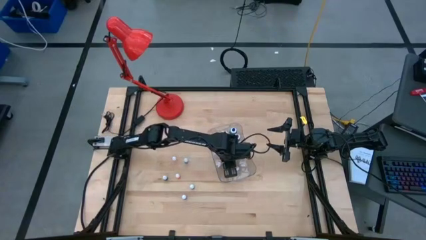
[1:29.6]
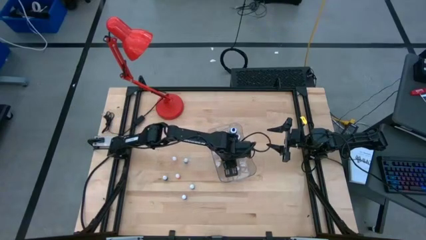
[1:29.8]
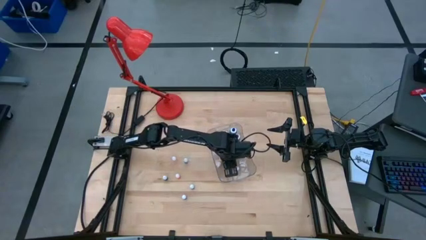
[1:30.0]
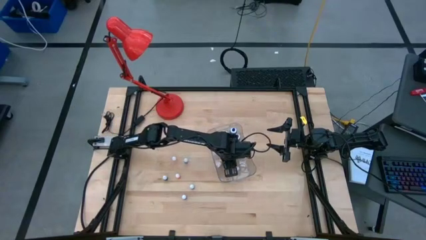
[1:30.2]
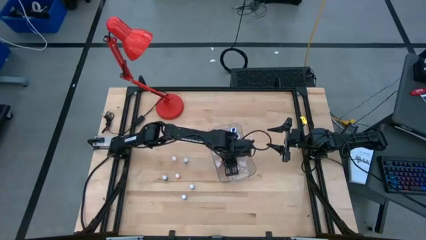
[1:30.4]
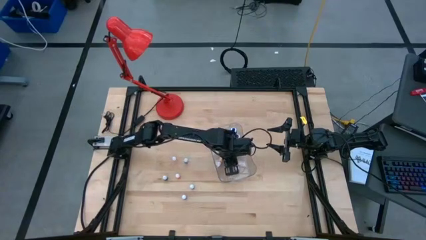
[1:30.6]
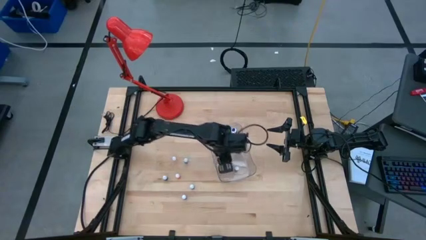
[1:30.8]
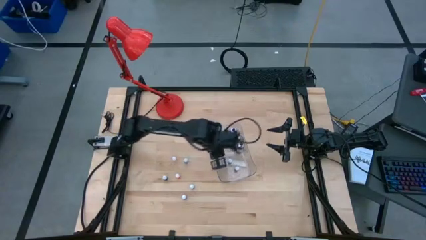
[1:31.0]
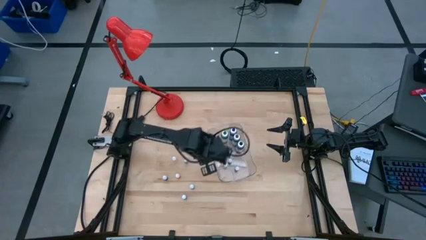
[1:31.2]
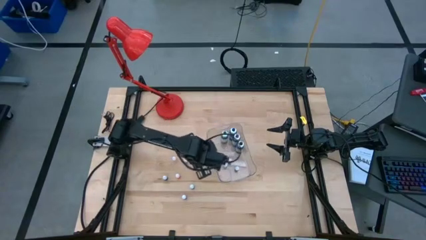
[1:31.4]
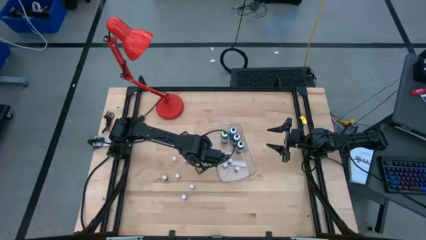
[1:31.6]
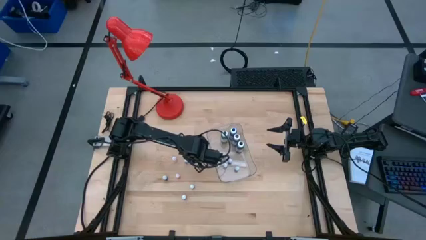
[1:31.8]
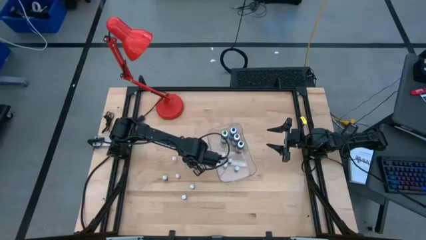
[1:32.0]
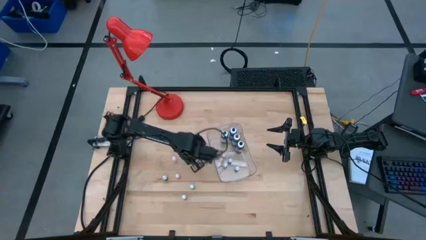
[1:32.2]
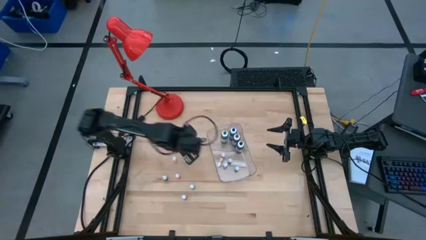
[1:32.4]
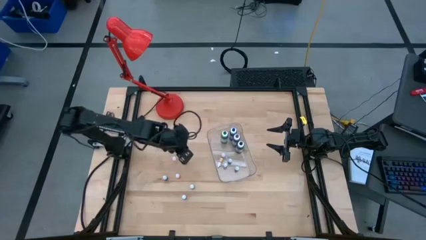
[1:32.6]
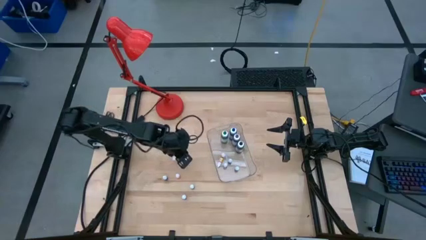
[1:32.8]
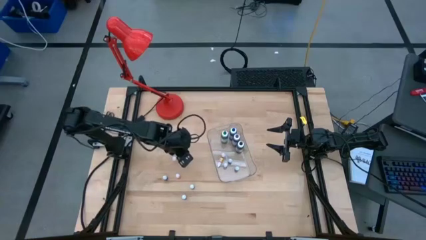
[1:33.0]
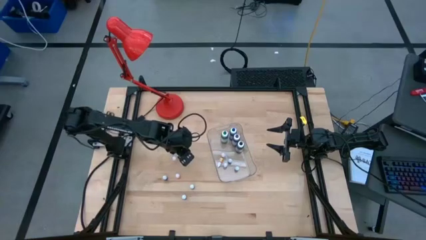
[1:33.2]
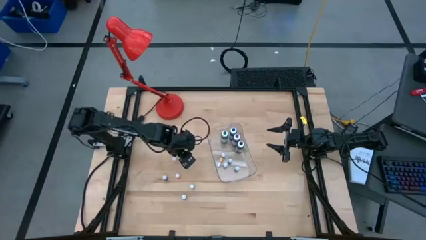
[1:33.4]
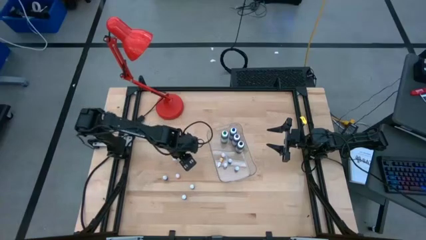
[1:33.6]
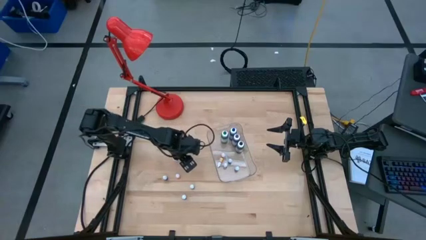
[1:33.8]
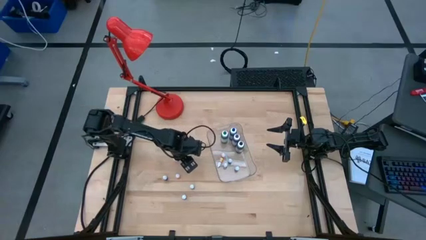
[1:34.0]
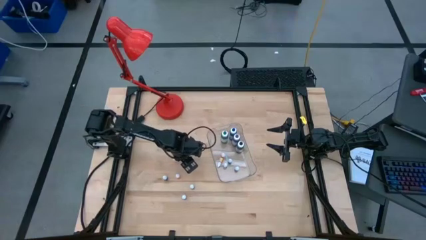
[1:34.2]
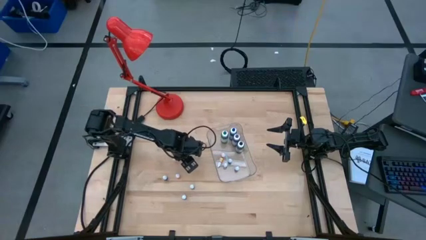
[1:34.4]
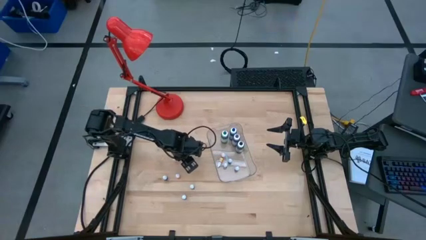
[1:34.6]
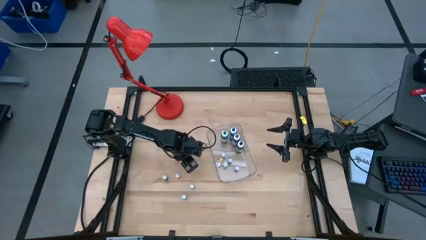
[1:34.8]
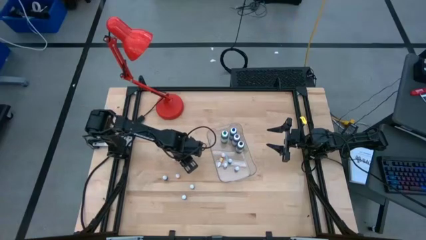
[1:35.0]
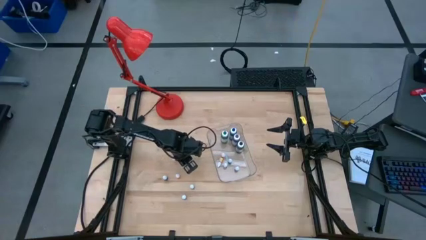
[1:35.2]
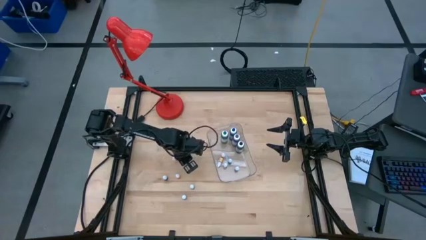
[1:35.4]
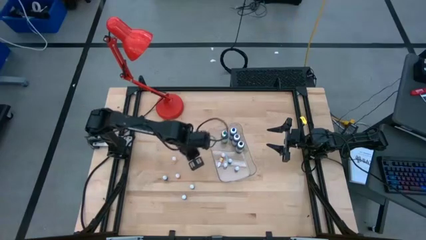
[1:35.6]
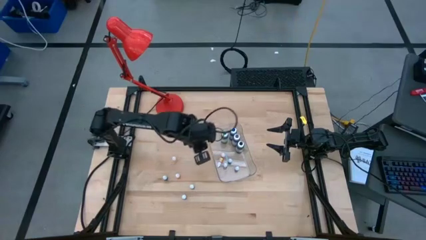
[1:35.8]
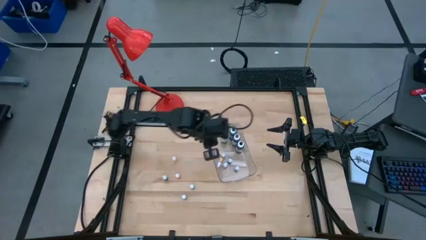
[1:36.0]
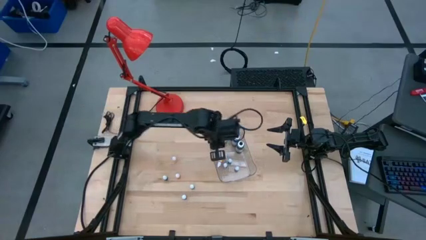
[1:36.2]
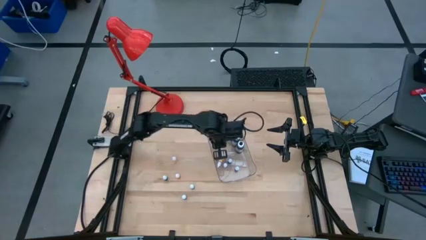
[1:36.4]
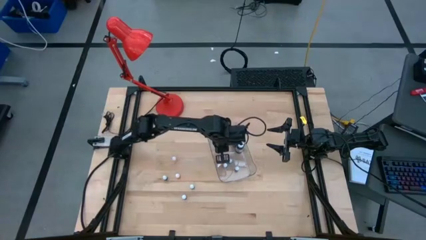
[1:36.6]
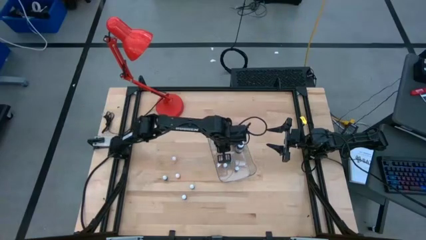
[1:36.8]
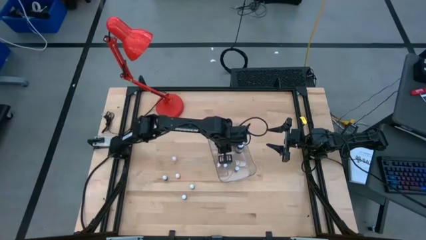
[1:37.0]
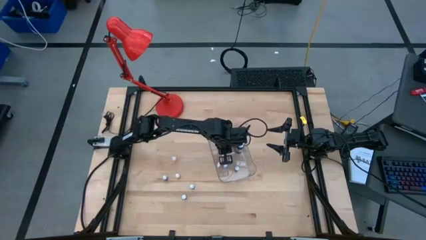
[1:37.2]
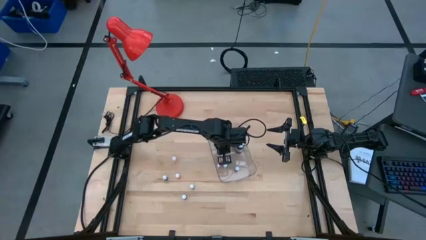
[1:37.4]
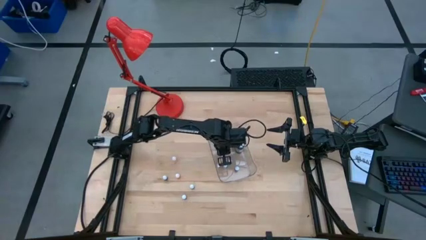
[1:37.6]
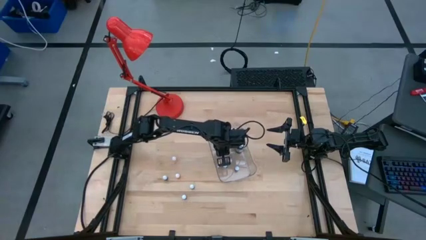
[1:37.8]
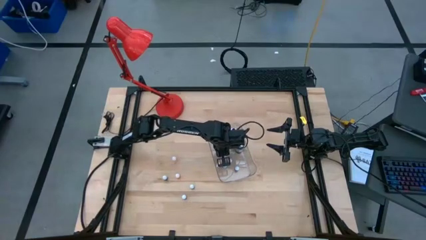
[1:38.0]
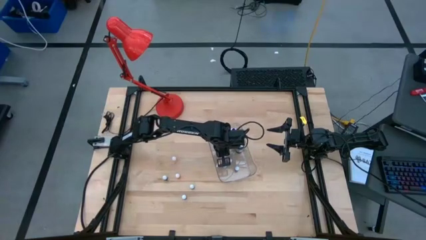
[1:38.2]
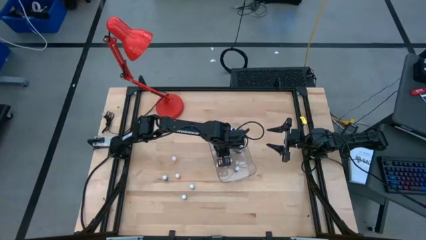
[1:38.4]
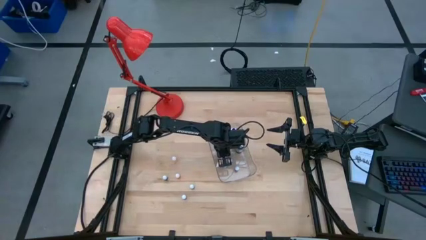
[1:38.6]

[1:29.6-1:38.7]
Task: Pick & Place food coloring
Put the black food coloring bottle into the transparent container

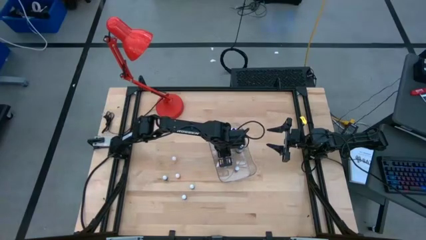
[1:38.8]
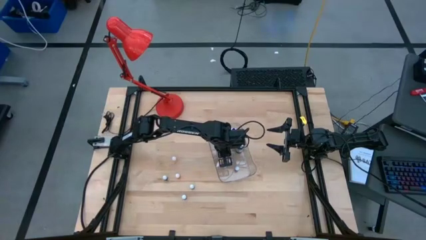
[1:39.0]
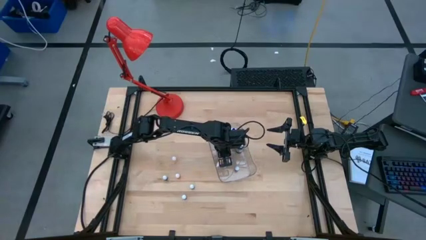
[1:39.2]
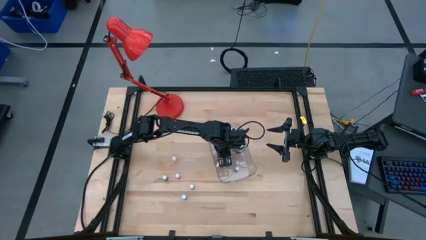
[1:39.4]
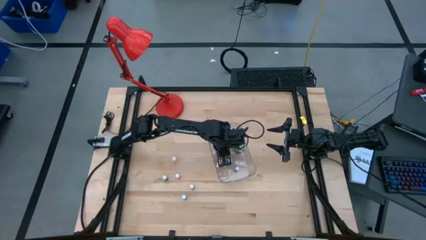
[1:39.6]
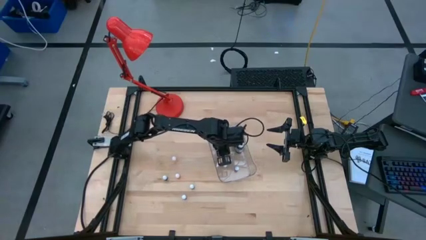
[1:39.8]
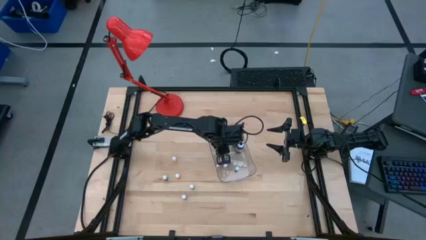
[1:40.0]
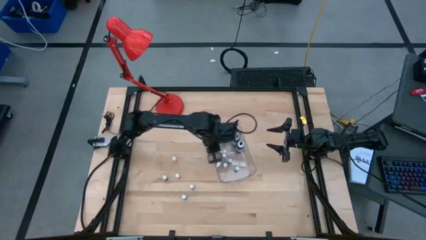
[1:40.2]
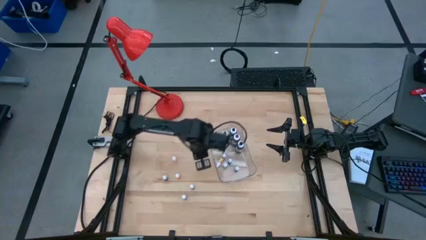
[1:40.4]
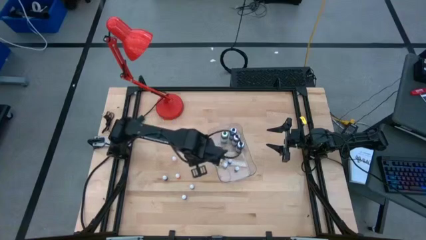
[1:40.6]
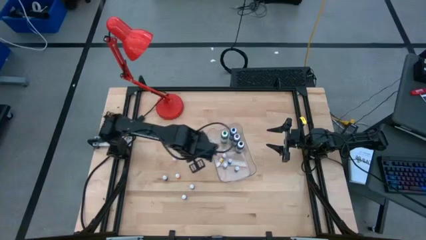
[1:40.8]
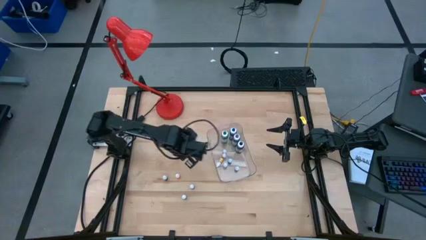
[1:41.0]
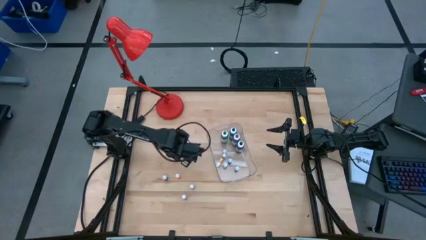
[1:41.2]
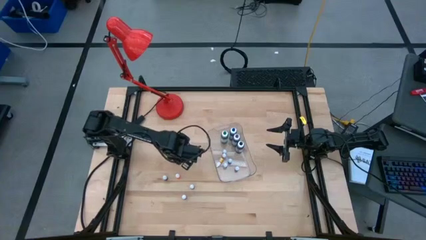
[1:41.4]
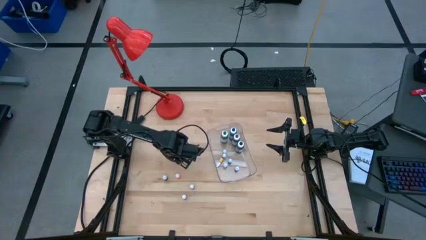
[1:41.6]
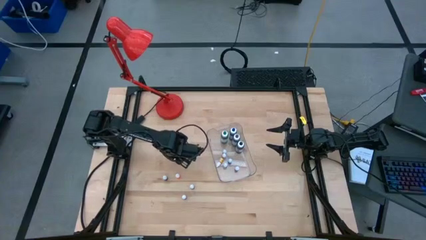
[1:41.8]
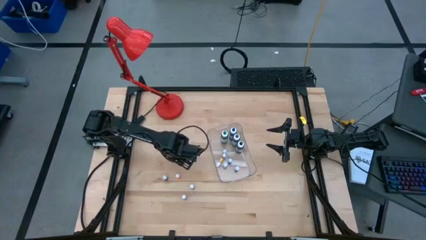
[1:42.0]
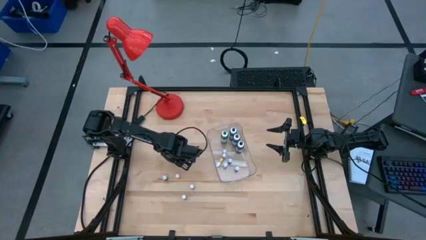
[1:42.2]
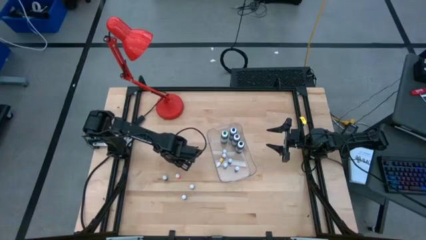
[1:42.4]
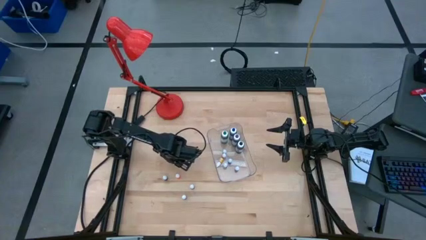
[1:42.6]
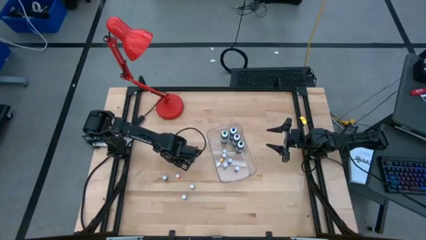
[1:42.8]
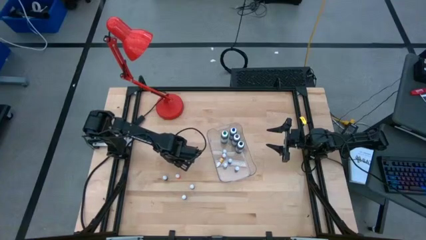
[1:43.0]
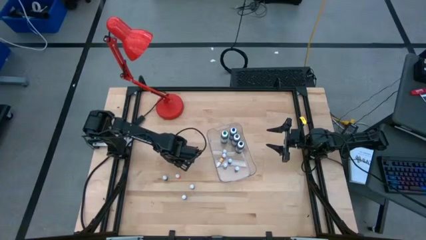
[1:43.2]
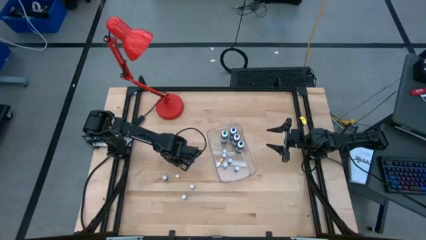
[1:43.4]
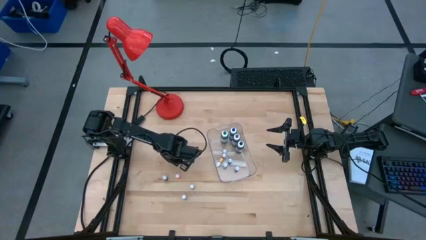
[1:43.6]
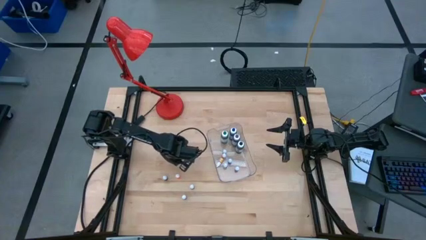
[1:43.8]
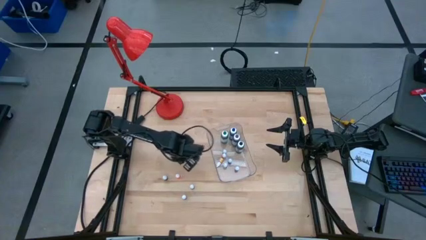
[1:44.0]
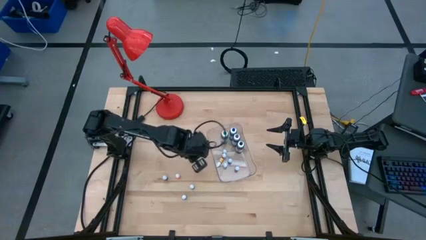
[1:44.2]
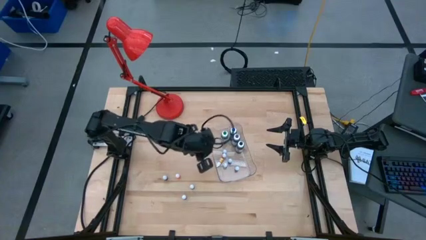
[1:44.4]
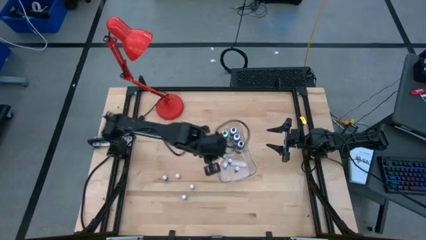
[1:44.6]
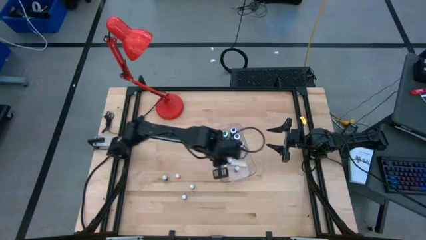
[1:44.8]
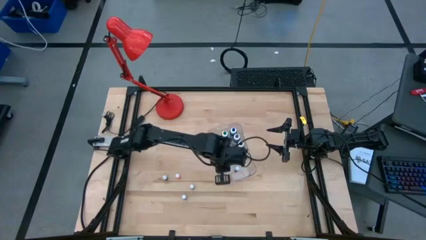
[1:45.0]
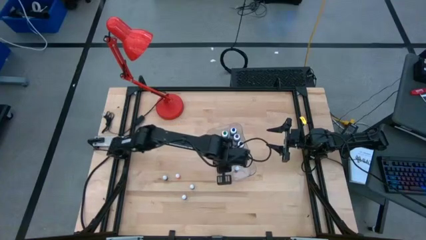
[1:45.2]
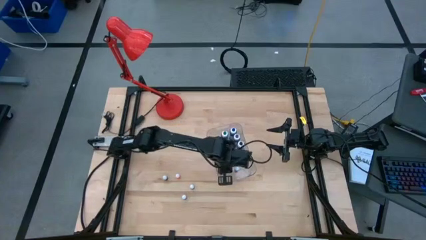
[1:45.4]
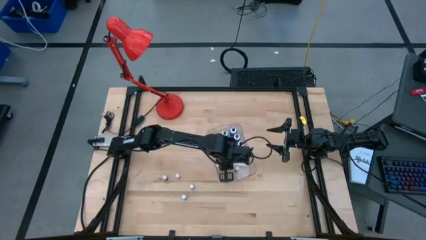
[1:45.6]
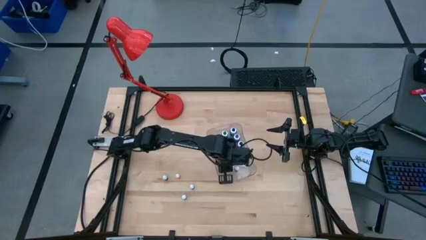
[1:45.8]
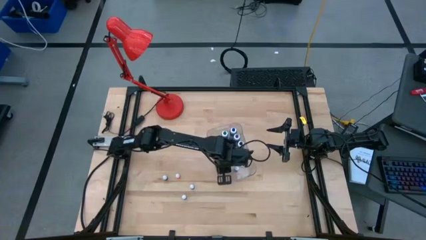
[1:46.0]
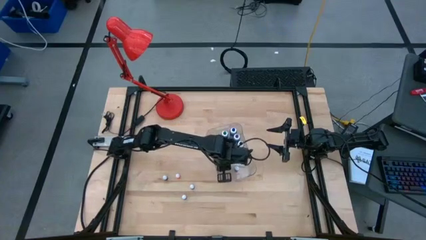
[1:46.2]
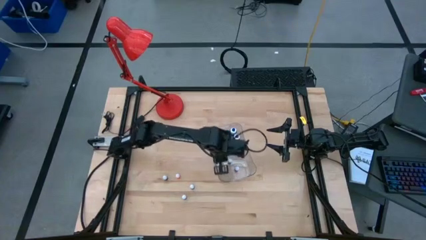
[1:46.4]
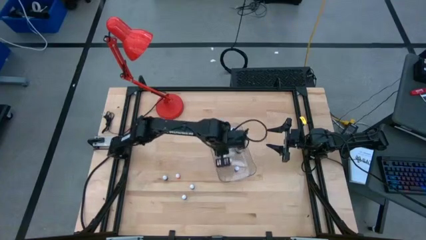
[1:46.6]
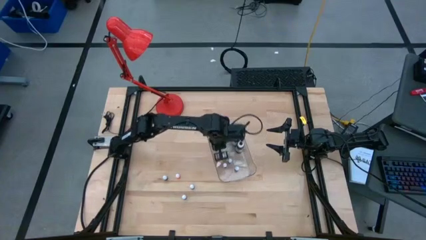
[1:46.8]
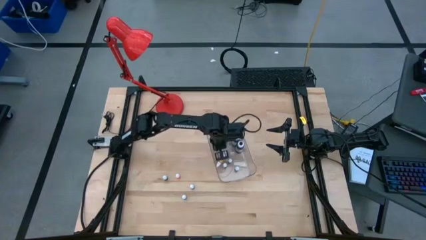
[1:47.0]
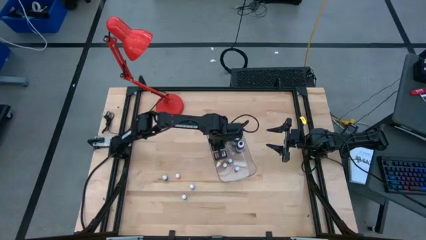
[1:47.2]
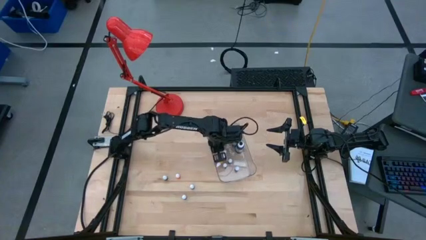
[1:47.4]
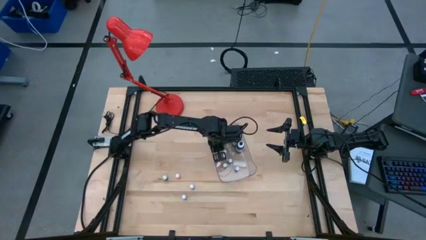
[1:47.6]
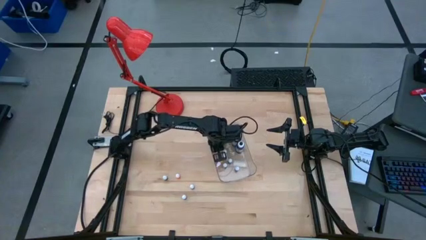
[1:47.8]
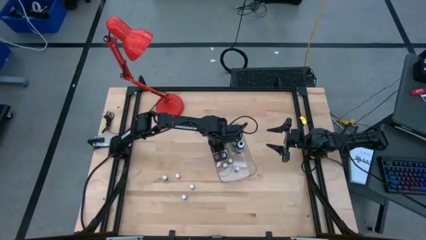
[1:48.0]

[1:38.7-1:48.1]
Put the orange food coloring bottle into the transparent container
